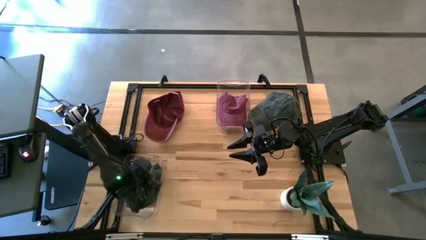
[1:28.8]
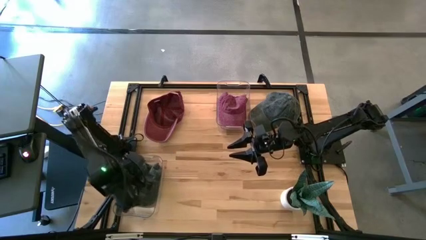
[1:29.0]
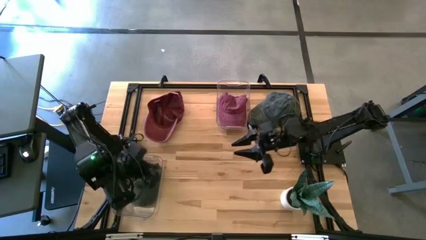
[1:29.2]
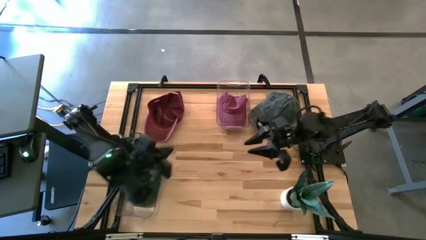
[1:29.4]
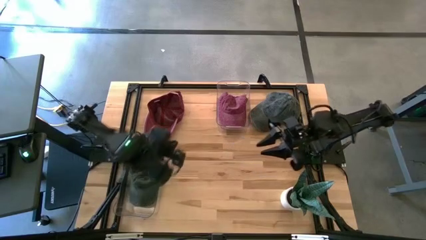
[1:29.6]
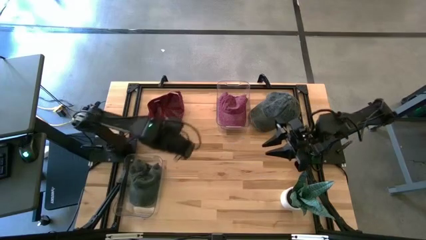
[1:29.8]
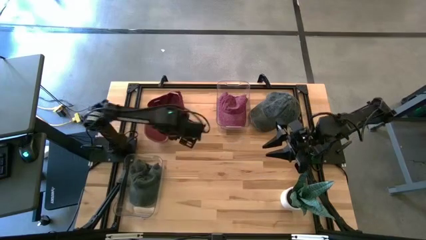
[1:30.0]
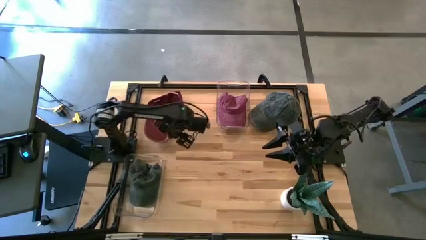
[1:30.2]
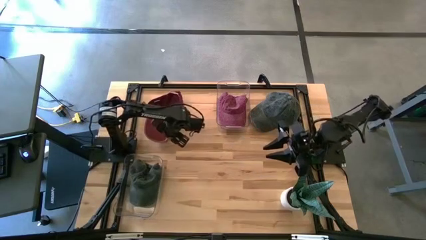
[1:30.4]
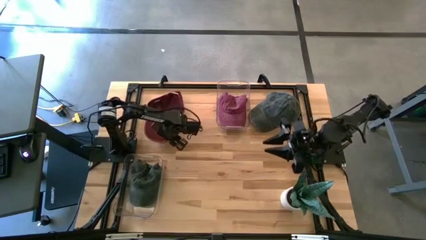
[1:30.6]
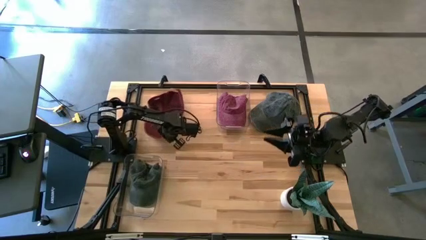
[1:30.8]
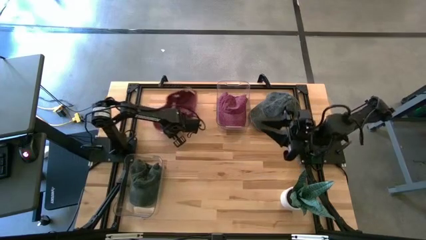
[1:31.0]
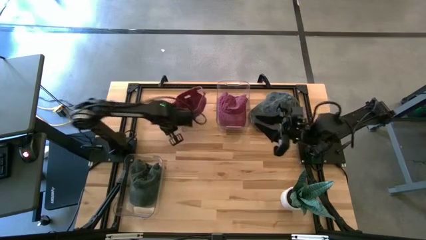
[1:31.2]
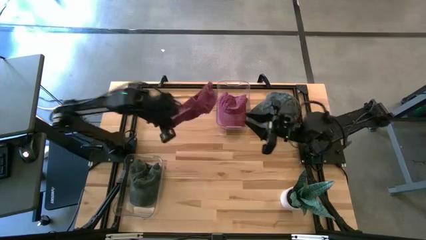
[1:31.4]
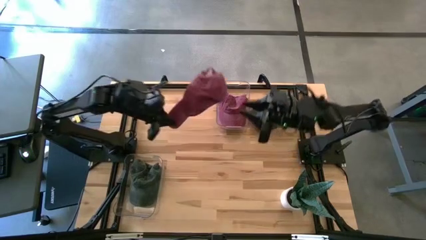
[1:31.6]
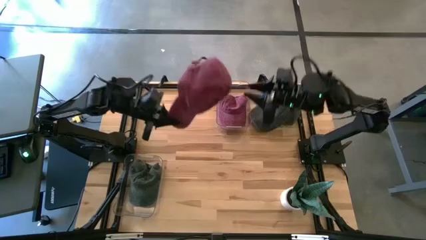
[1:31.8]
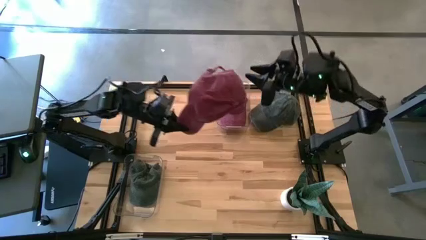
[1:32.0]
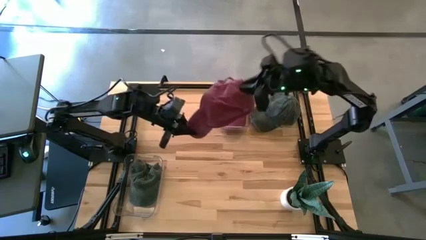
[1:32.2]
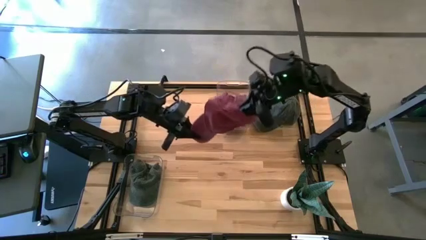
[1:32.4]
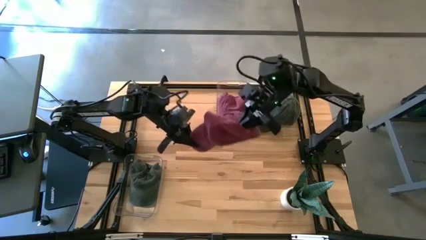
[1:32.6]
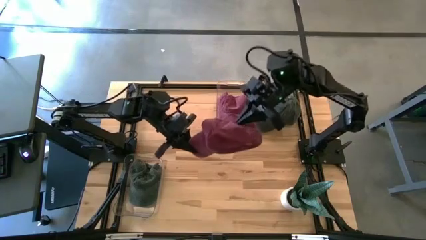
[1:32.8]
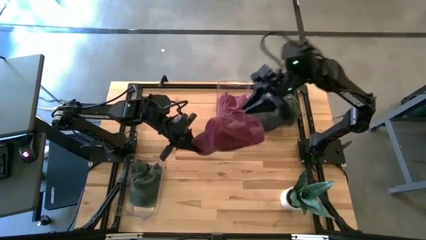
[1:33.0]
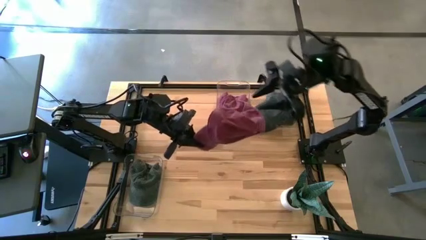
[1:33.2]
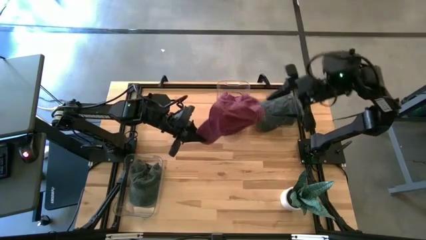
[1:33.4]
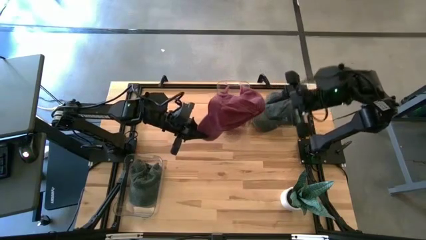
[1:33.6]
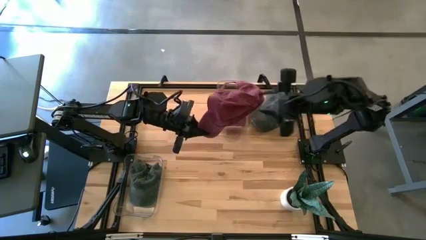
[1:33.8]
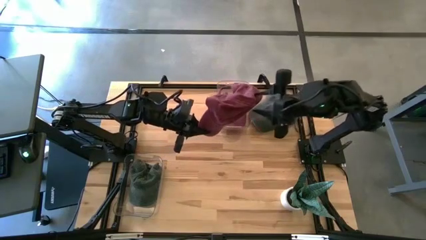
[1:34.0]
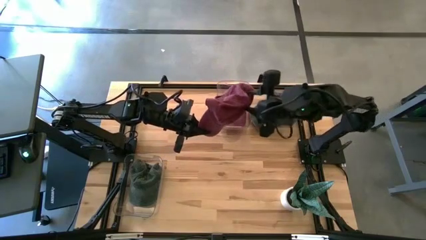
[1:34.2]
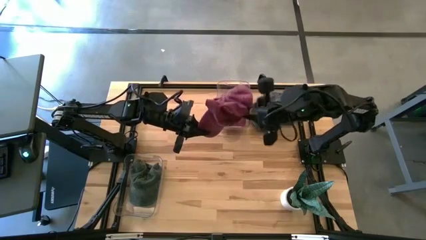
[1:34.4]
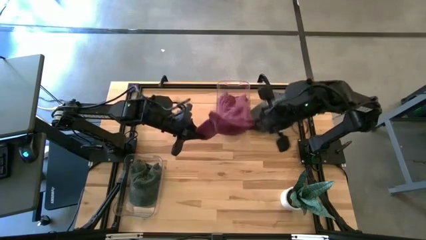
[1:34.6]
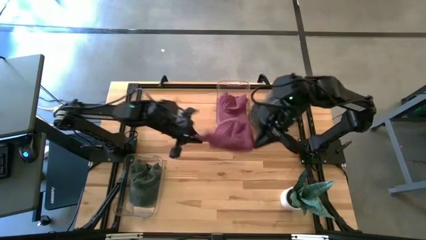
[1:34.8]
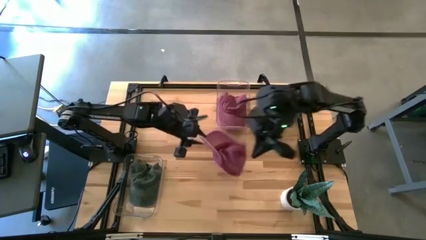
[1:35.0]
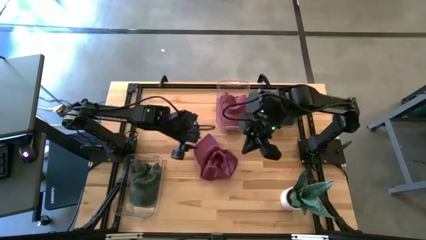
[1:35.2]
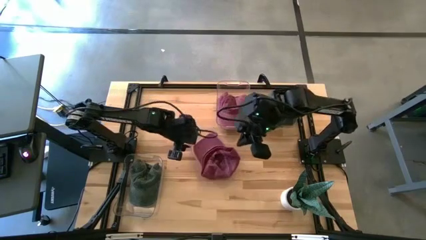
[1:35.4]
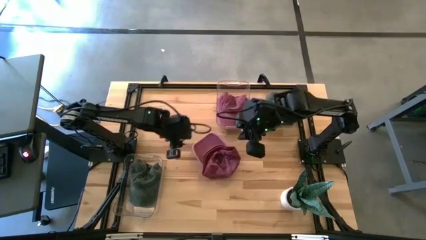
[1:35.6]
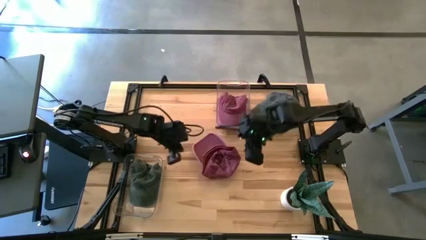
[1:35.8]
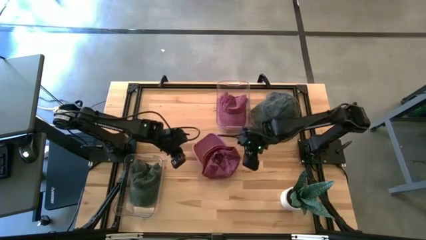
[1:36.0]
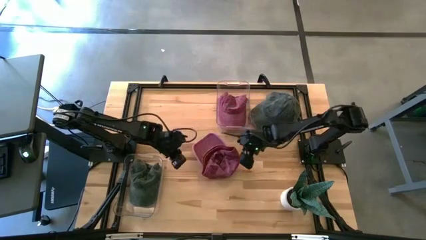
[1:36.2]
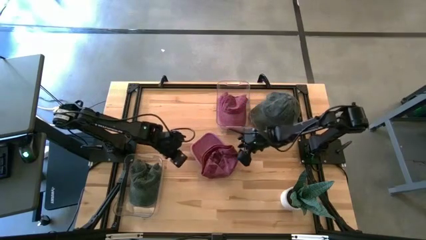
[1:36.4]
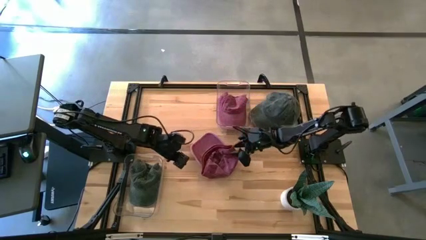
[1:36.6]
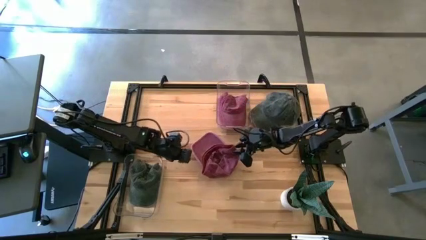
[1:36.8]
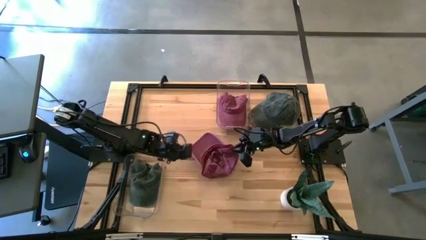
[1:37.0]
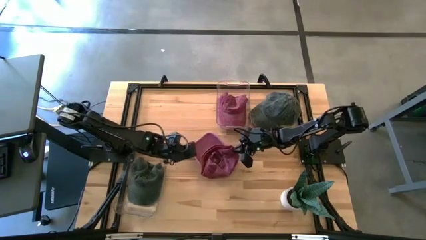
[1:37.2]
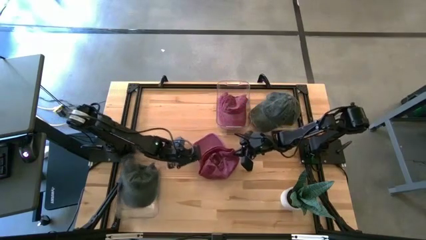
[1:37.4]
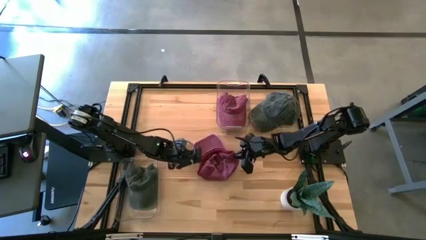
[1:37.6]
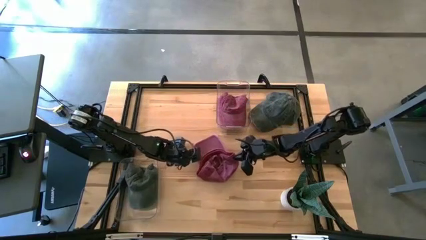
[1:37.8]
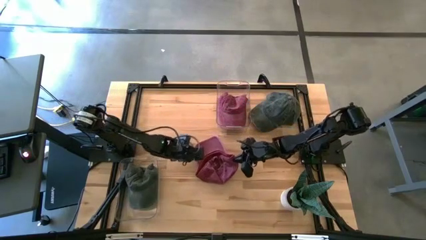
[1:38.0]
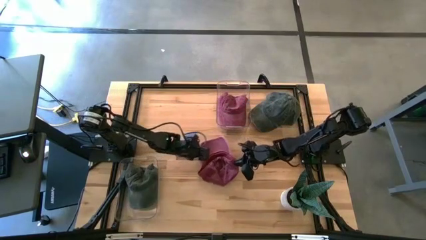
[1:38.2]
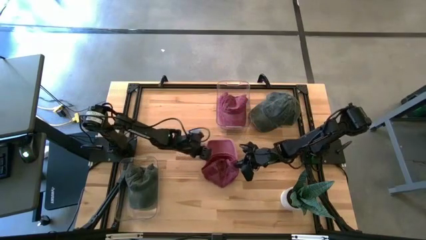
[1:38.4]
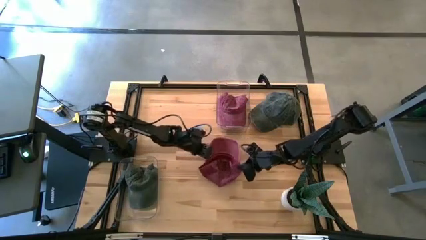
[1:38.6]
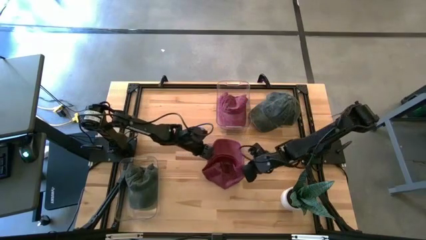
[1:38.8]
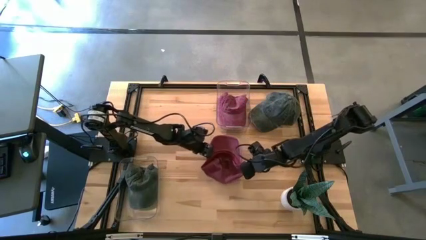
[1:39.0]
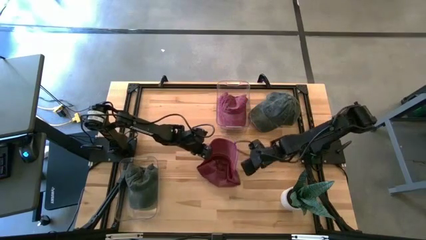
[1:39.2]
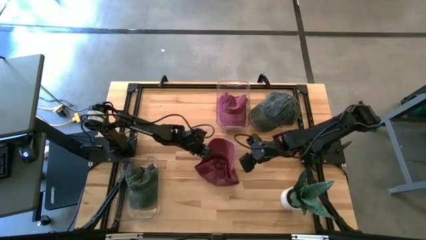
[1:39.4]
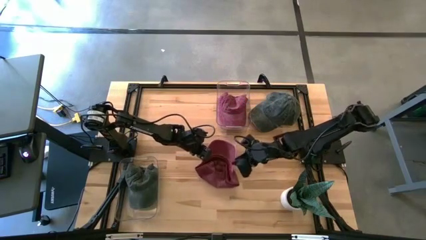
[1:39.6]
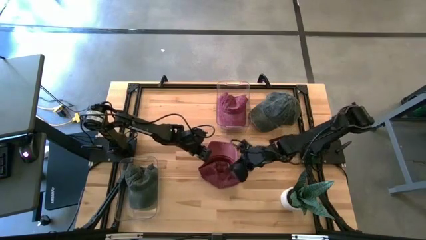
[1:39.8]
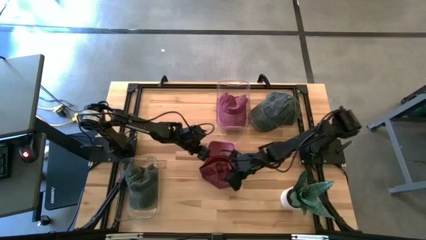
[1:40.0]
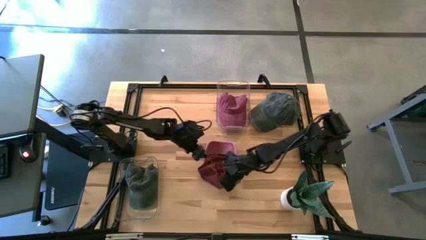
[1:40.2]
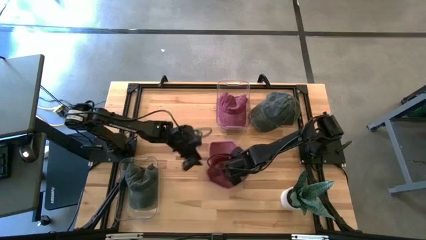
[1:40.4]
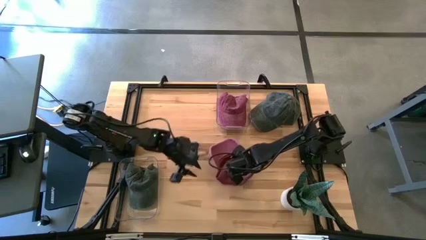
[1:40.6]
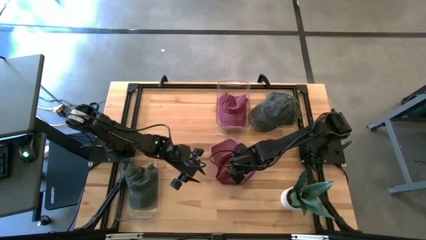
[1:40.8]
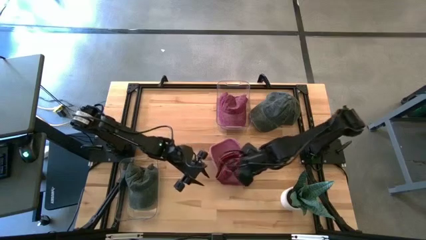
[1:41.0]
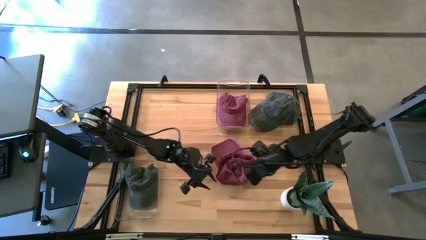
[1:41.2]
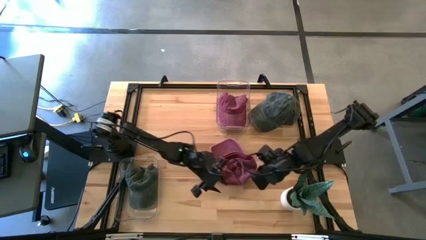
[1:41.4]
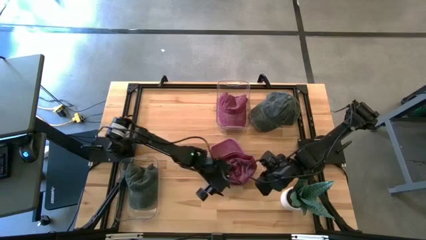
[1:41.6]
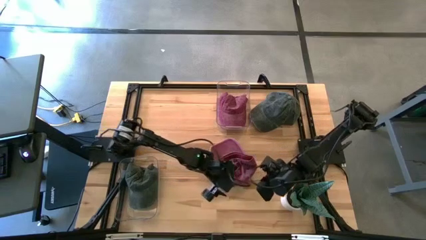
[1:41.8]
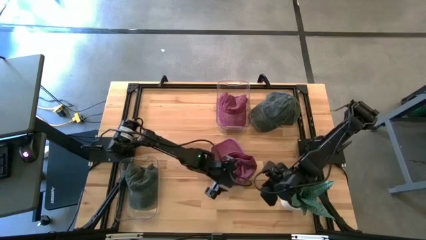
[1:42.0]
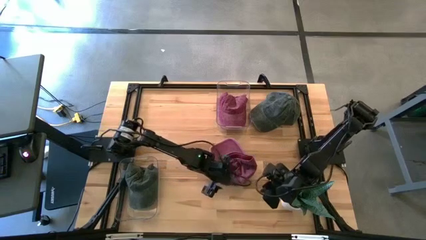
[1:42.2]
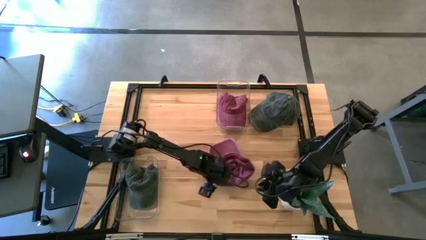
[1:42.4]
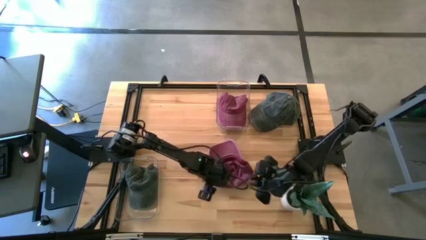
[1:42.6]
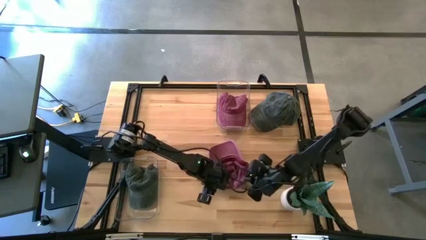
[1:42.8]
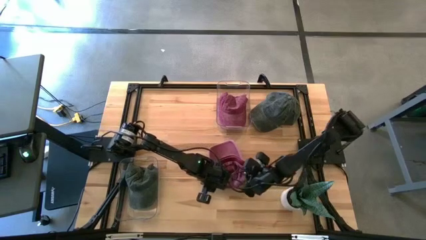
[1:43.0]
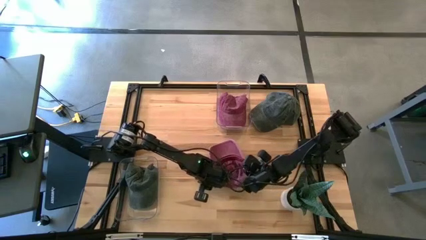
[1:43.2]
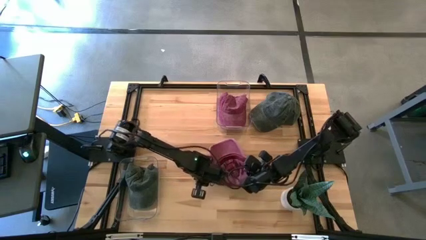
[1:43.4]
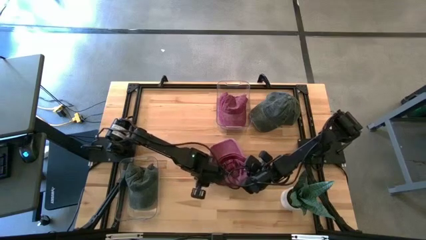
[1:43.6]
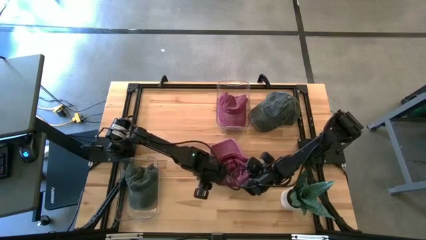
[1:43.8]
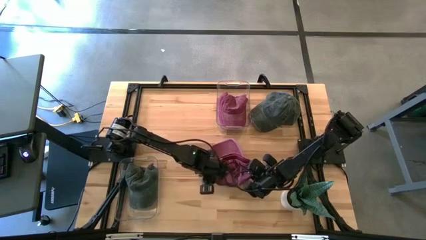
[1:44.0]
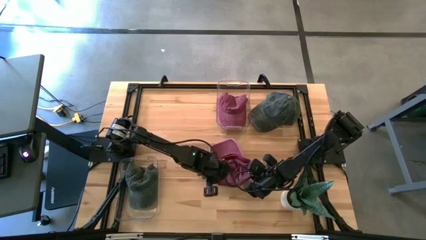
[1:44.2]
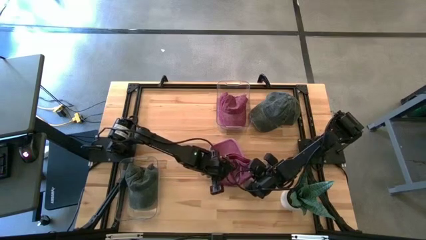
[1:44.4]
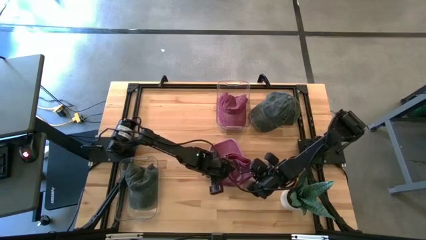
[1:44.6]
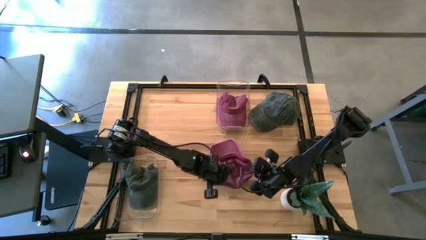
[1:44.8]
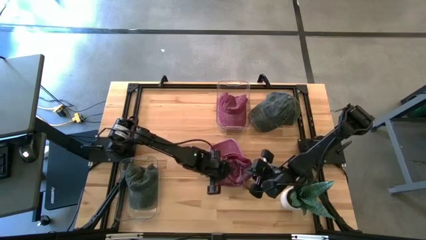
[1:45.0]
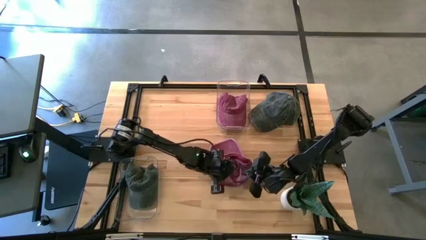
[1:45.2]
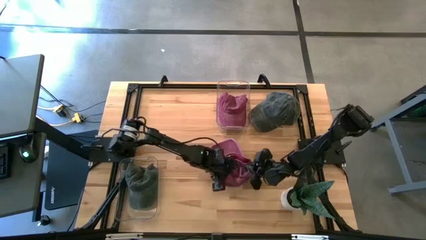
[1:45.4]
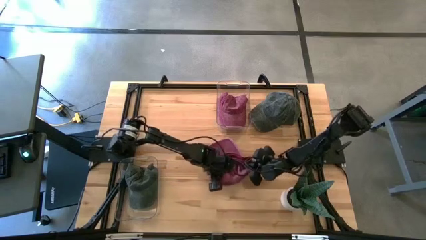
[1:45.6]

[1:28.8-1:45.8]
Task: Pick & Place hat
Put the maroon cap into the top transparent bin
